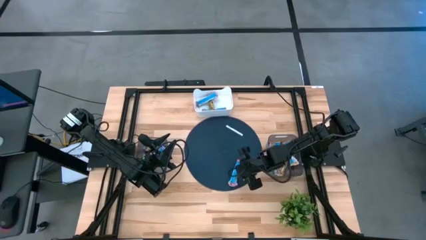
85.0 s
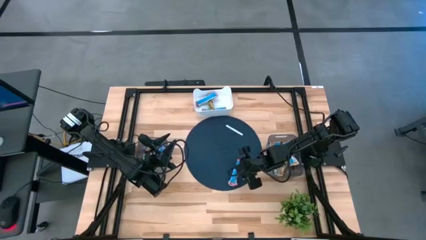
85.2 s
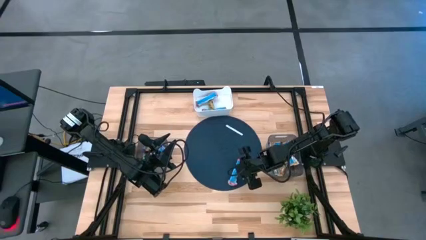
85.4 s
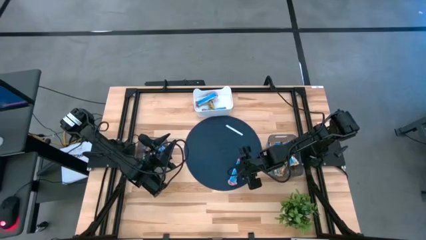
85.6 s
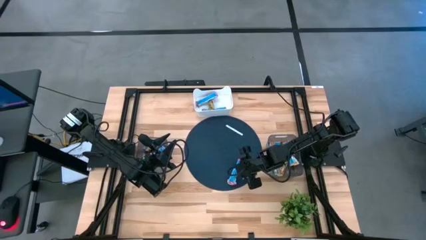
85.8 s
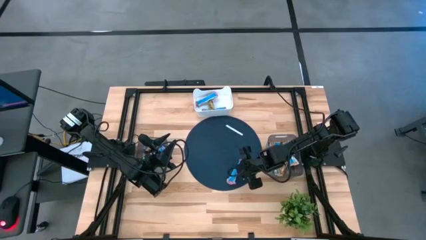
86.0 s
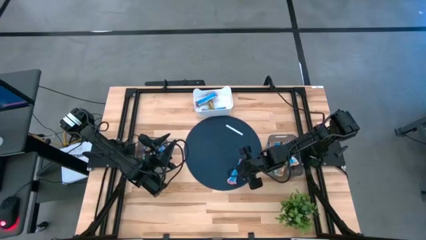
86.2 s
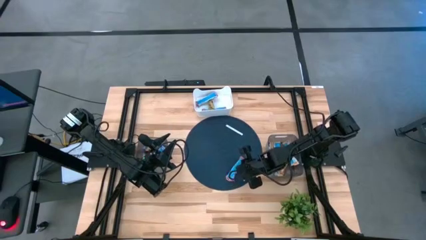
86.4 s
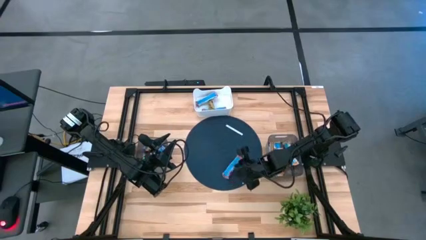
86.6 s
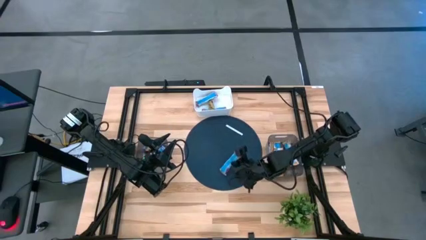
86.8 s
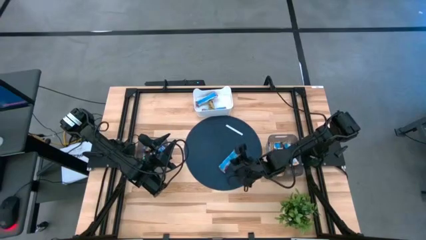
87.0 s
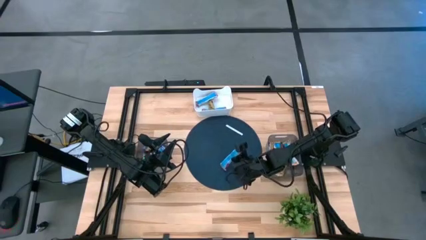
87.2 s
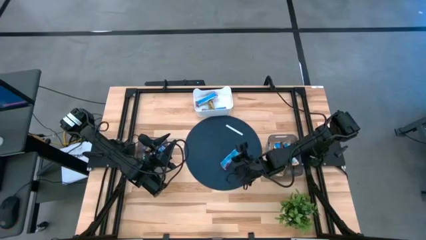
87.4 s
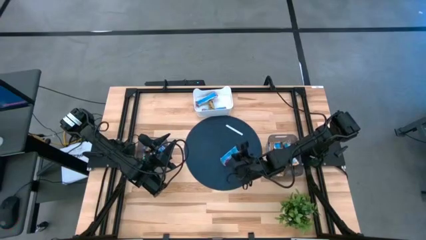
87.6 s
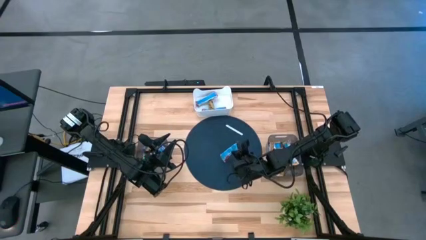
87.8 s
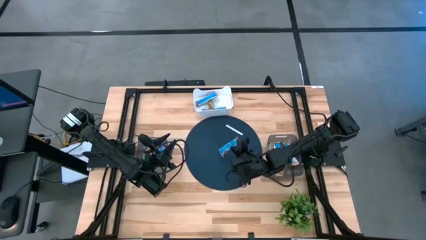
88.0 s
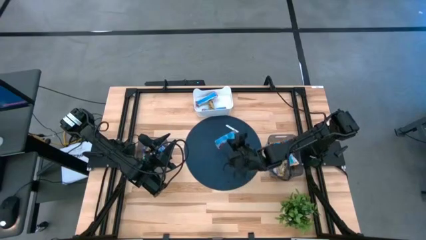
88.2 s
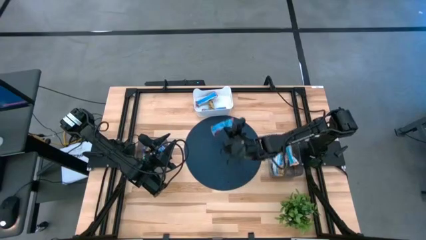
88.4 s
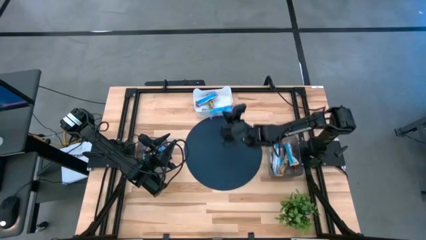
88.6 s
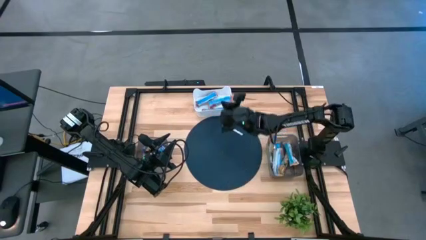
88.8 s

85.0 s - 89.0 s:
Task: Pick and place Granola Bars by type
Put the red granola bar into the white bin

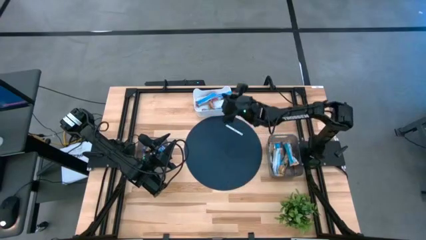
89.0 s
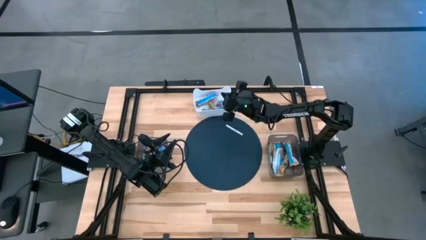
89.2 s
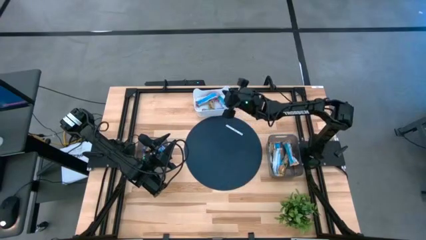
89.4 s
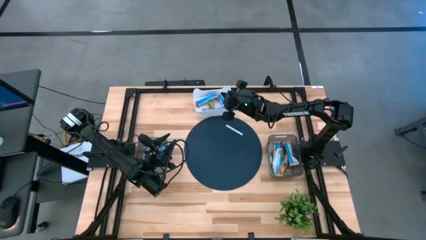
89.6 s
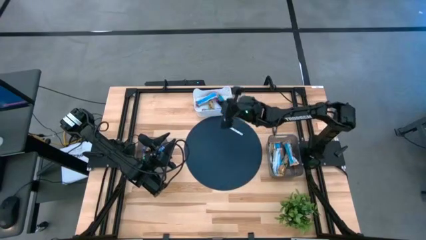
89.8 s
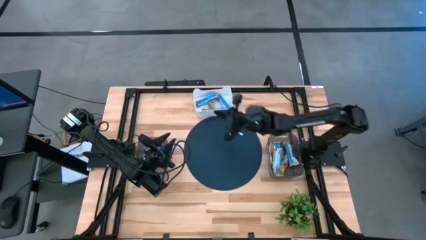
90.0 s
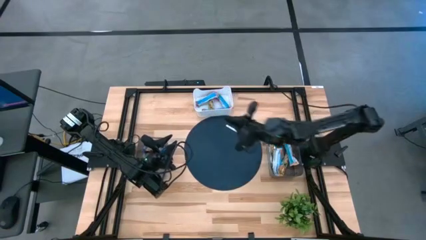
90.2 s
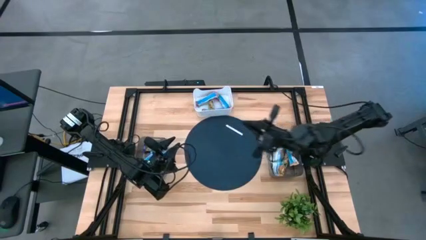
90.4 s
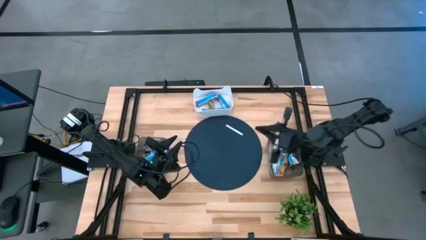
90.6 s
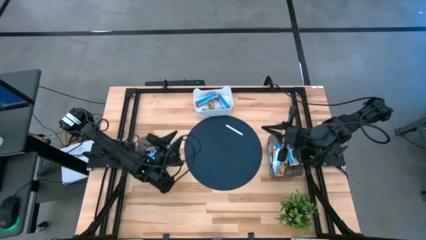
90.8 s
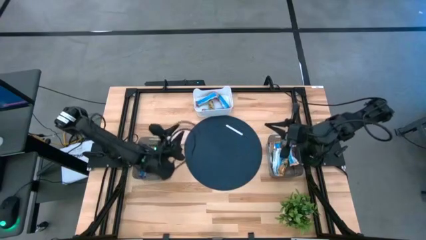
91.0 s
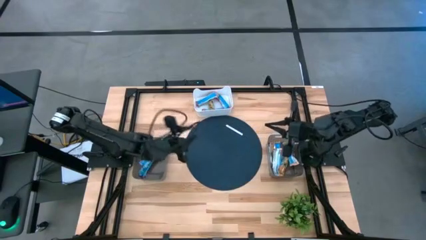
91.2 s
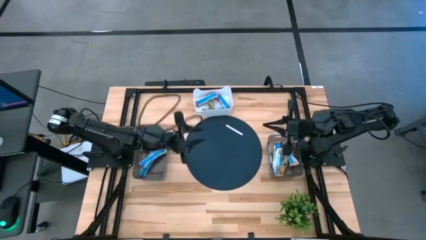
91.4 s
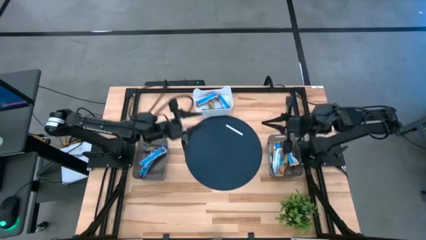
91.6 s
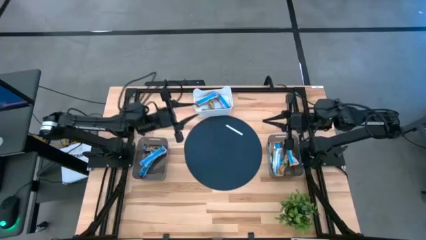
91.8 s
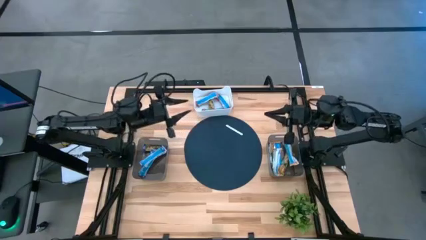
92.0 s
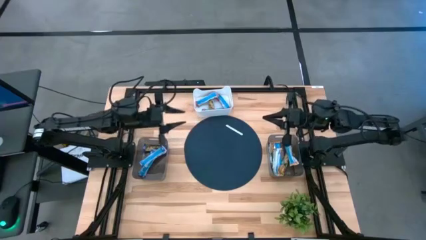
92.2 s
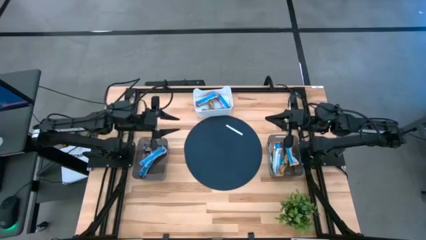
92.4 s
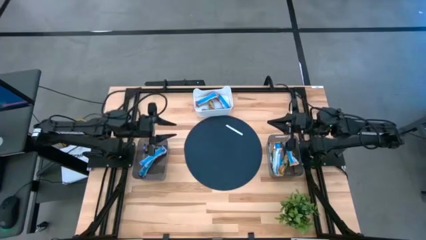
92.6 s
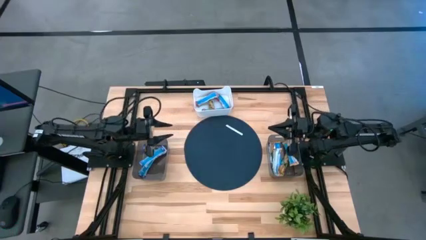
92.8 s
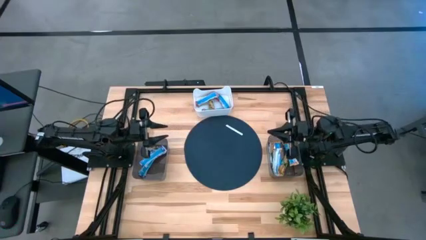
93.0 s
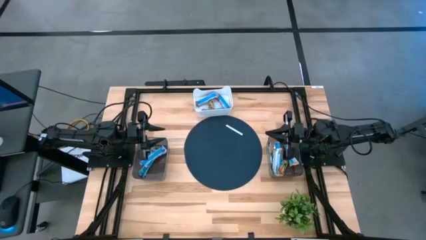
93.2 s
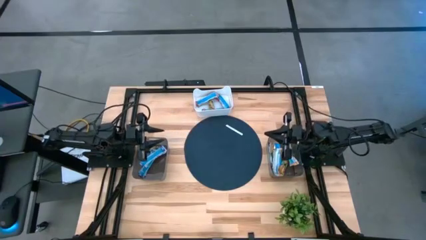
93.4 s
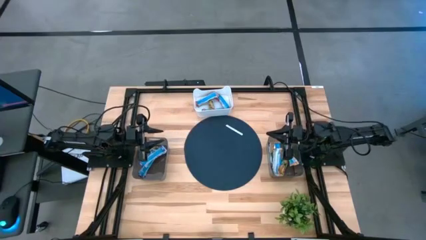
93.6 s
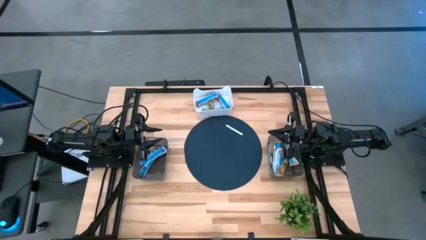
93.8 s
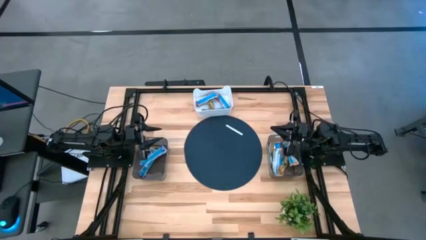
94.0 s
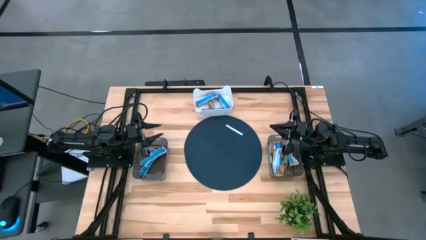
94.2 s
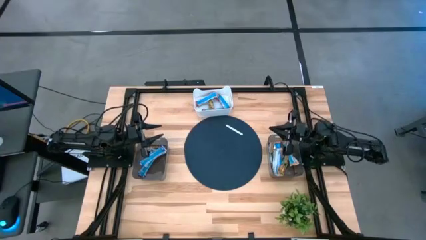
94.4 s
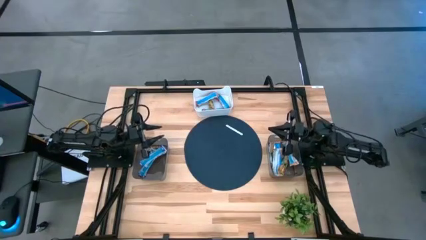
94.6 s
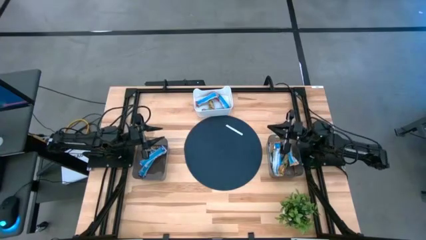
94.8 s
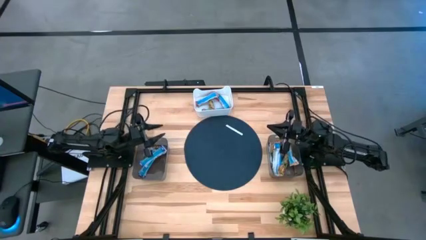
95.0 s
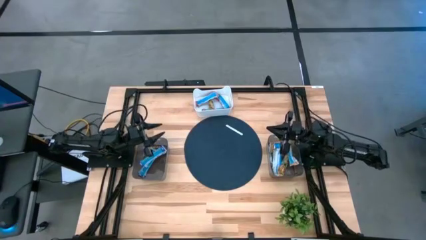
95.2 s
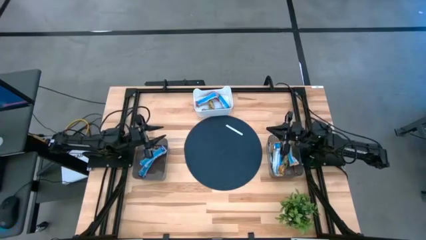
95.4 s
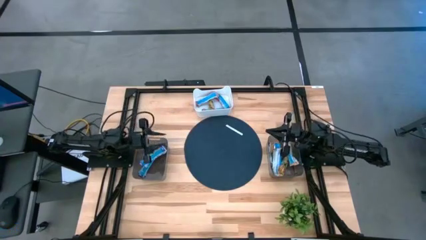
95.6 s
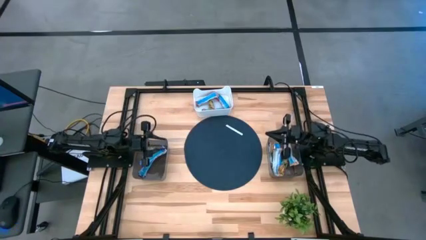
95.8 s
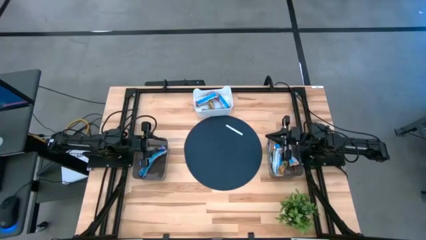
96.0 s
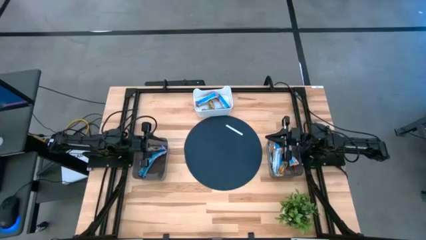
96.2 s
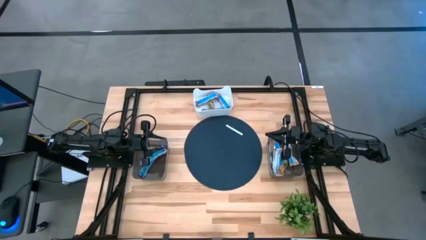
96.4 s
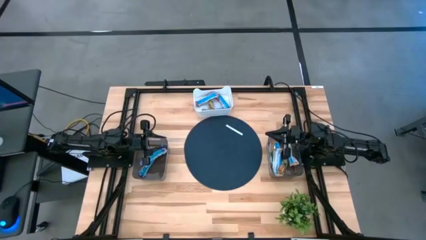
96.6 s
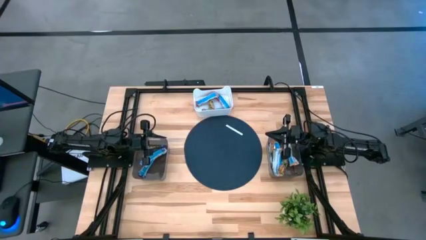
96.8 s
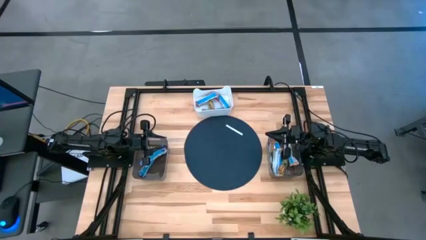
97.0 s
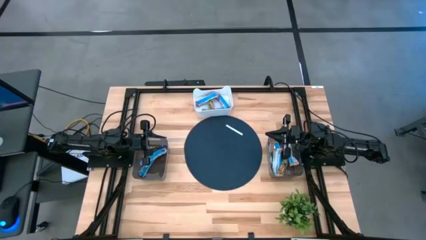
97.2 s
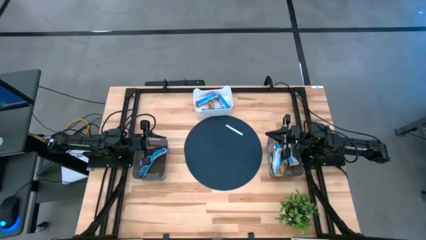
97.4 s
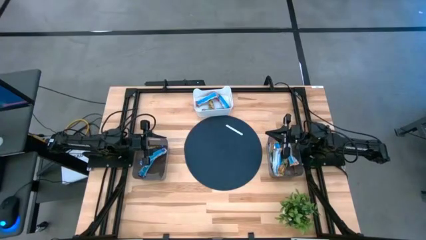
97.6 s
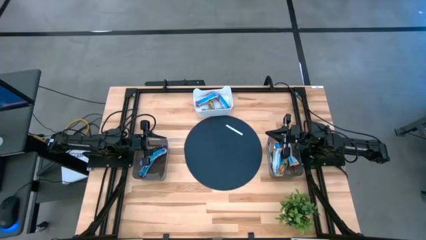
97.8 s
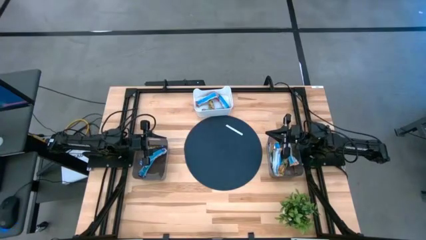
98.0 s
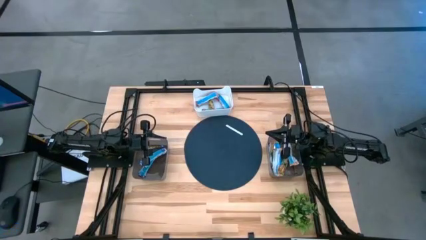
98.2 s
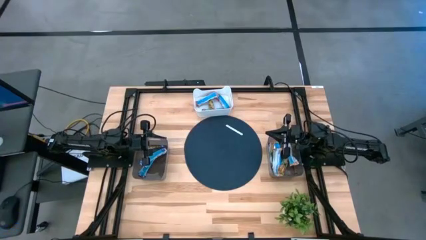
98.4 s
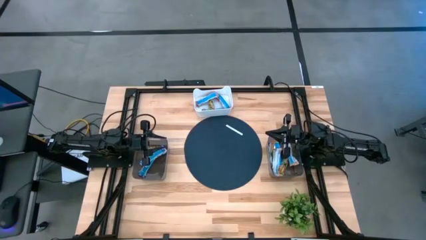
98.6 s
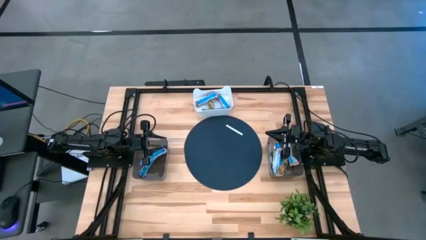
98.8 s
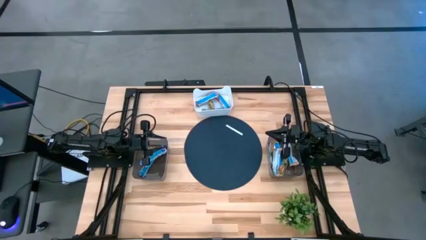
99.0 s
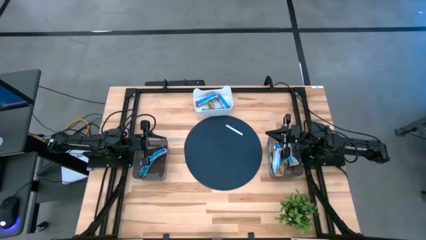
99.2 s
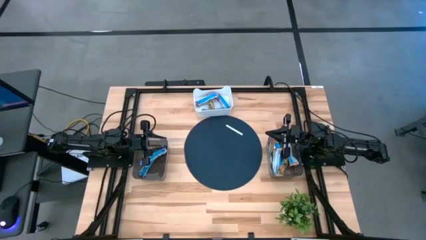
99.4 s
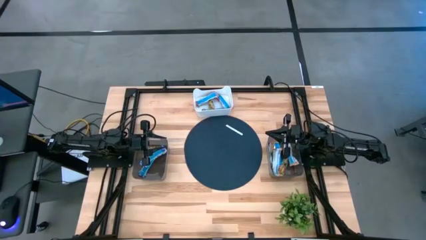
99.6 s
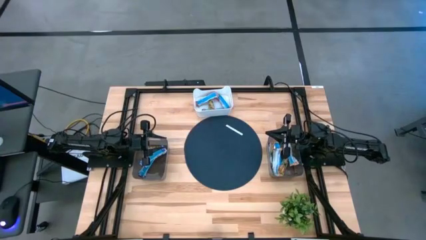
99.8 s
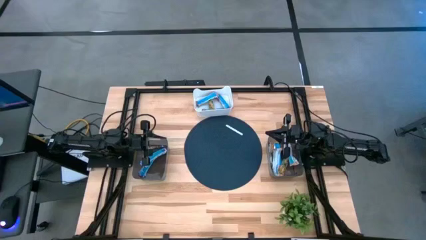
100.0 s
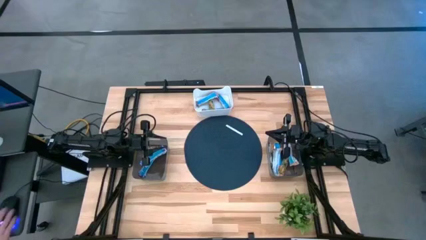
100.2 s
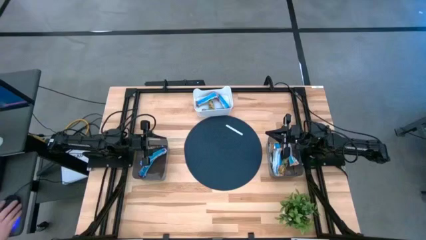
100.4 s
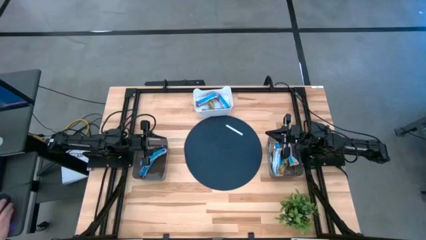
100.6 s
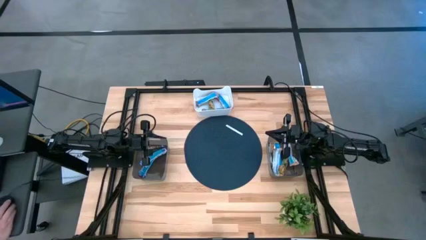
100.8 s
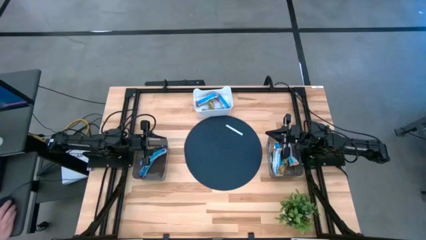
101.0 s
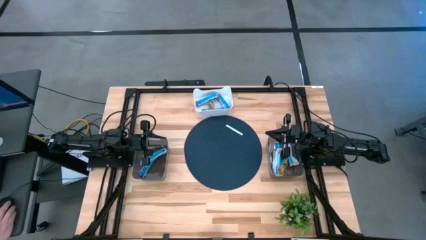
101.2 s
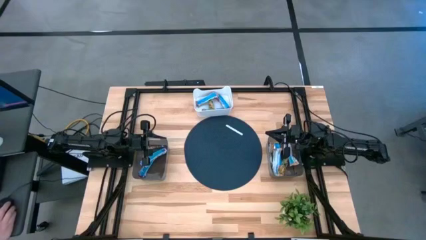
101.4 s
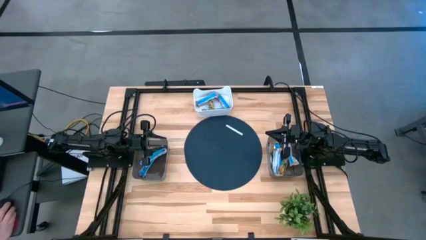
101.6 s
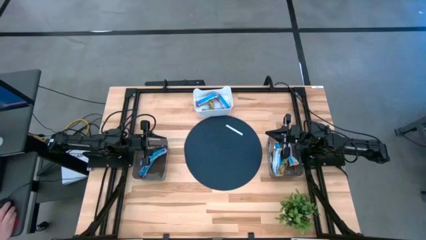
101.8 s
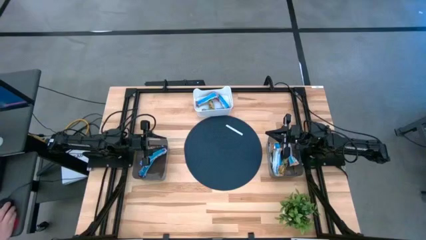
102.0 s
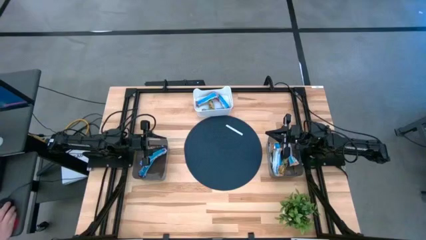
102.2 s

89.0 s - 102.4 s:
Return to Home Position
